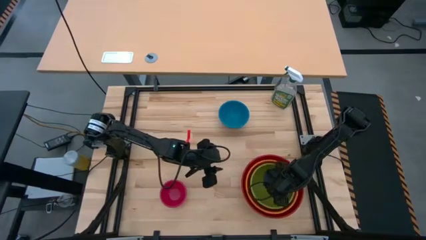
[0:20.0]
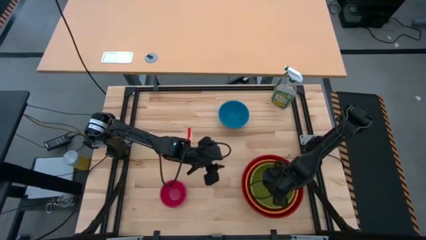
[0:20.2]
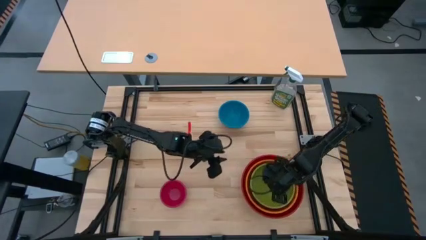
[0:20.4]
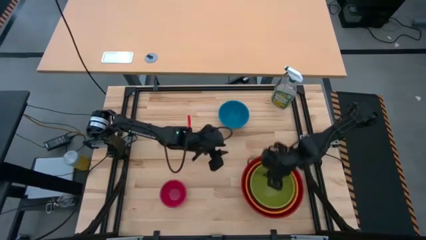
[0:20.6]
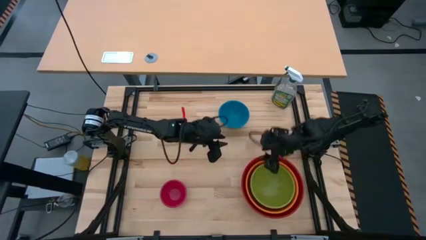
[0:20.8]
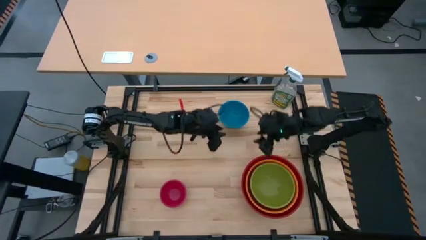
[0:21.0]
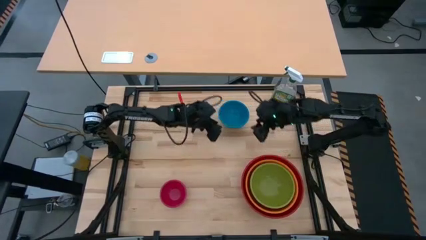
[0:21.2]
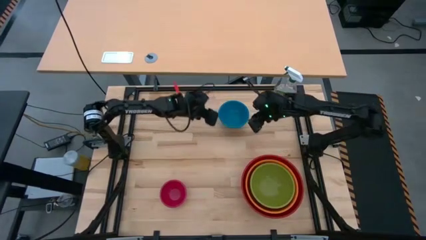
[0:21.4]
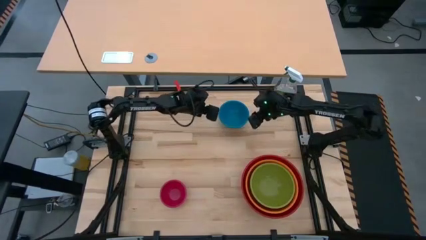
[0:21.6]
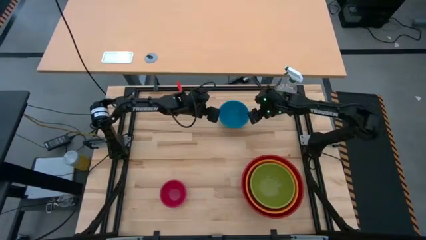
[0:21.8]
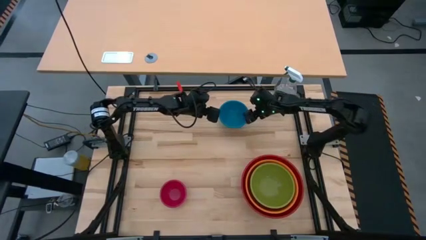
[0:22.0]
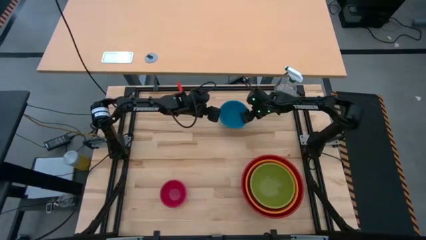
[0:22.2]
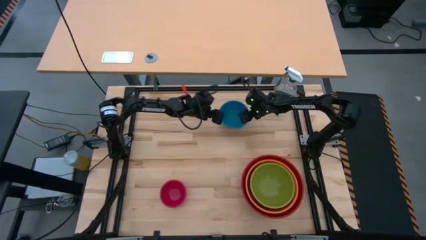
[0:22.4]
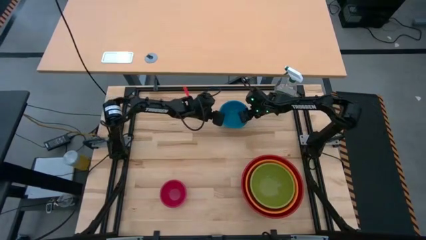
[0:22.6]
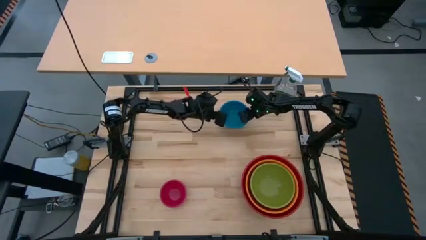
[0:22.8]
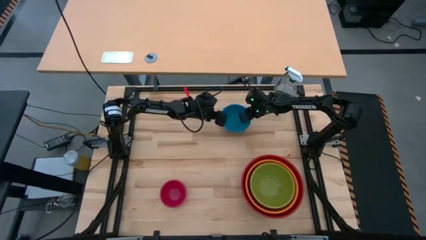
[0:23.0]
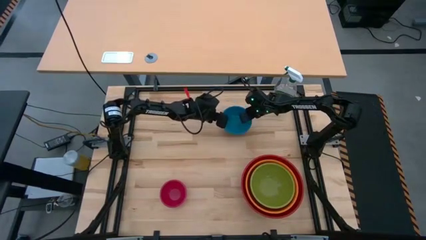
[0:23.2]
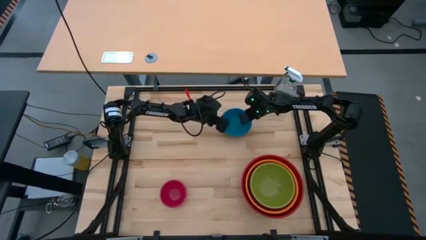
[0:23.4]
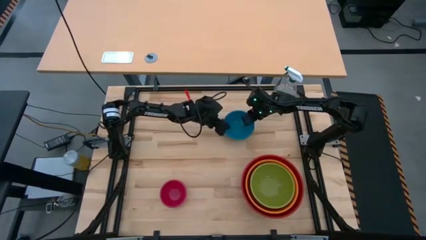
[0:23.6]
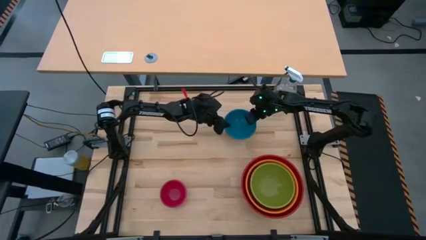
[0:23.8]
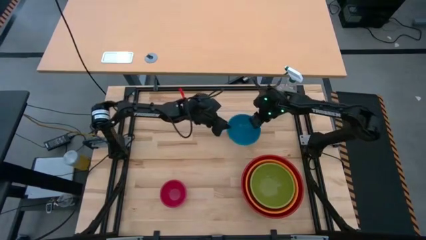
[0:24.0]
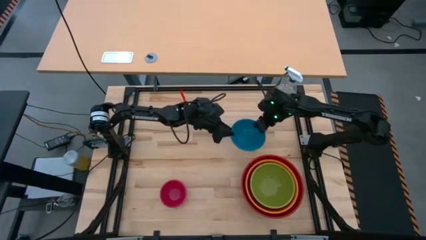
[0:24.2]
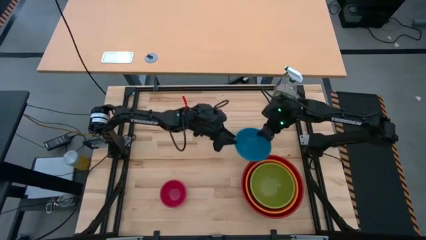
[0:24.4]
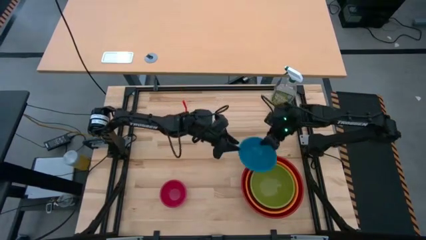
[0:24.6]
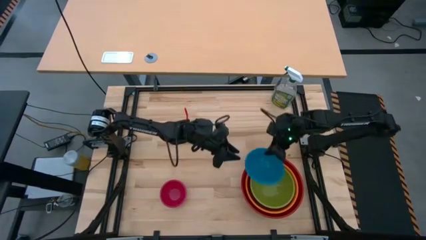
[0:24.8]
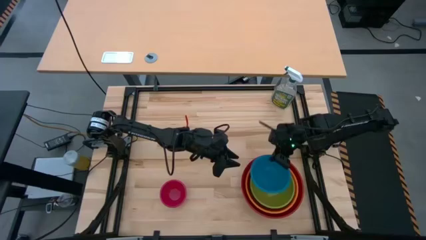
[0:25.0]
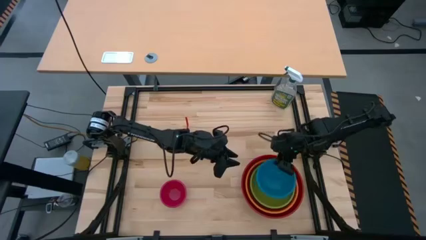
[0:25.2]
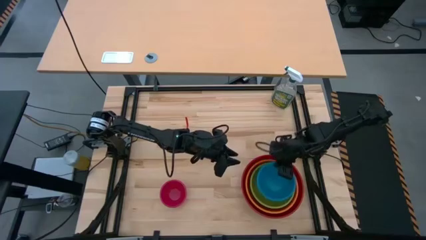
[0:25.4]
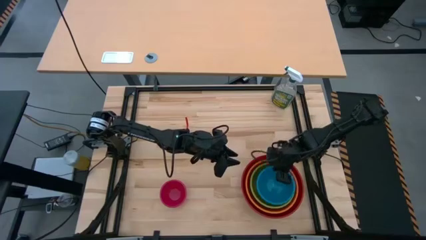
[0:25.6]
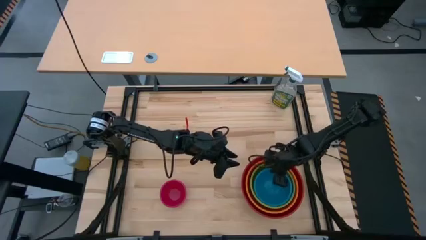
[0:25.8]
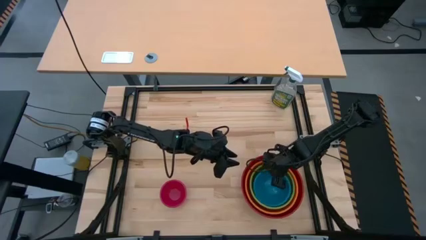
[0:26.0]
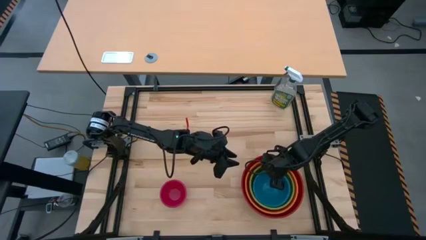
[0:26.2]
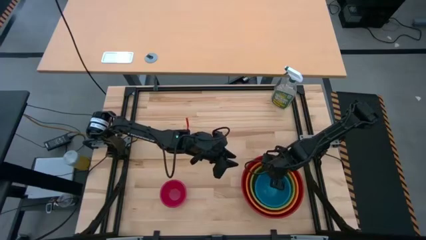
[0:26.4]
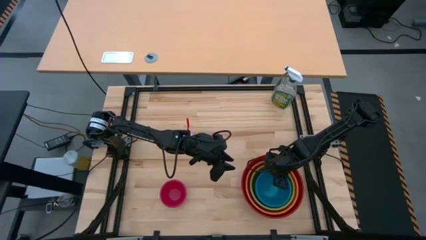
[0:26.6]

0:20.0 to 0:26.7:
Task: Nest bowls inside each other by size order
Stack the blue bowl on top of the green bowl

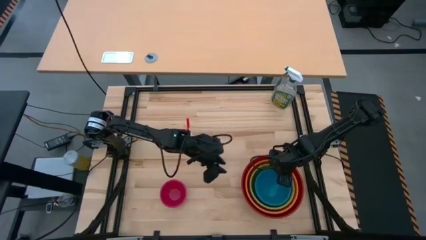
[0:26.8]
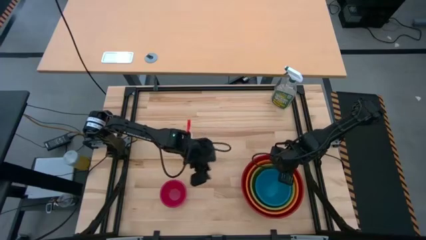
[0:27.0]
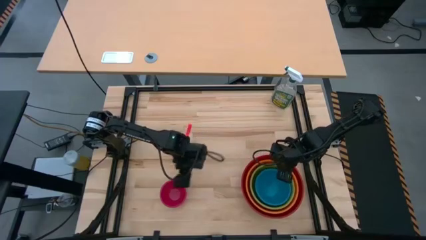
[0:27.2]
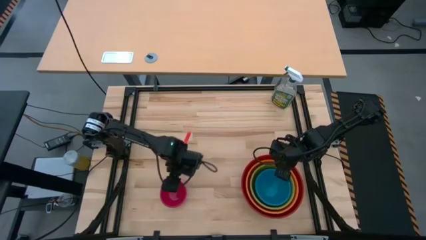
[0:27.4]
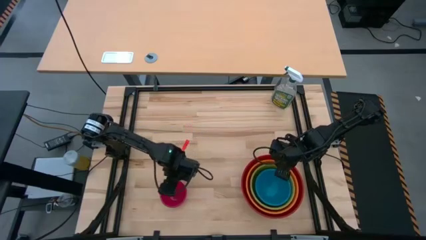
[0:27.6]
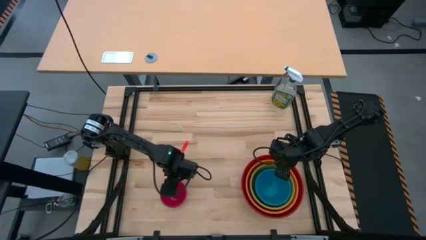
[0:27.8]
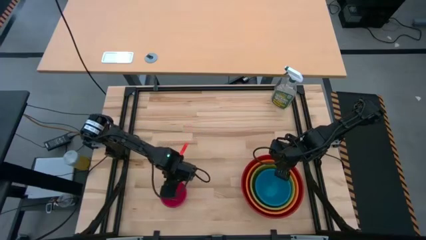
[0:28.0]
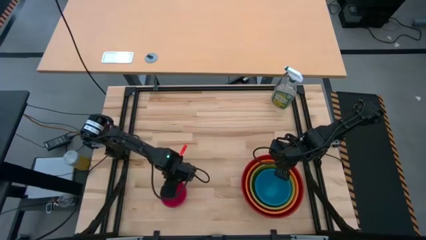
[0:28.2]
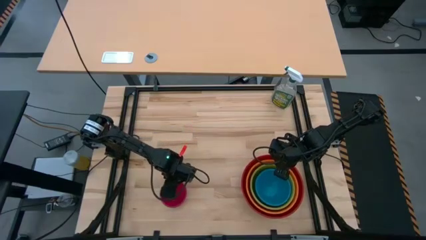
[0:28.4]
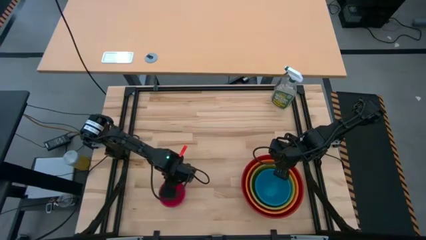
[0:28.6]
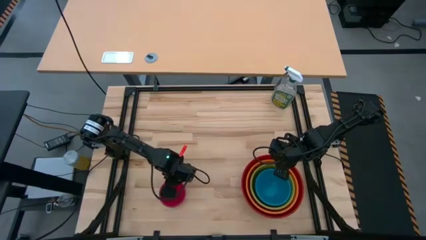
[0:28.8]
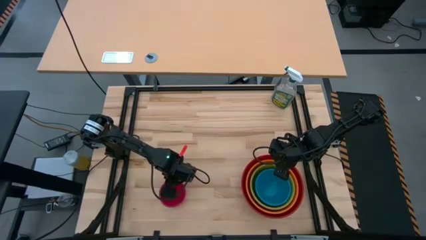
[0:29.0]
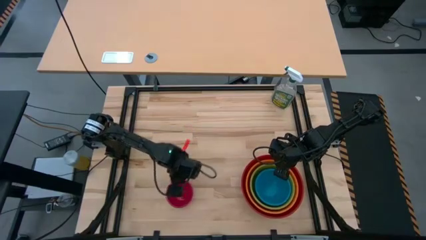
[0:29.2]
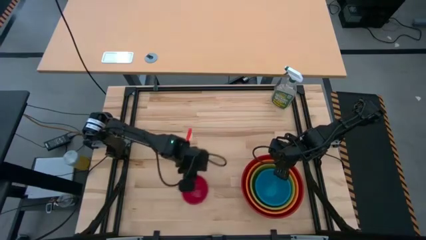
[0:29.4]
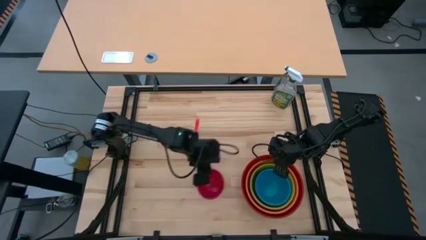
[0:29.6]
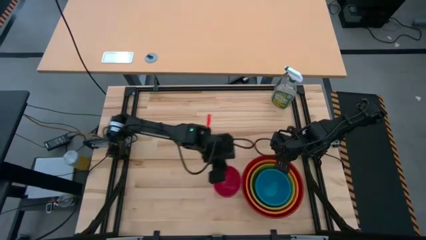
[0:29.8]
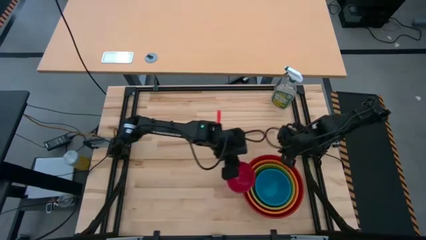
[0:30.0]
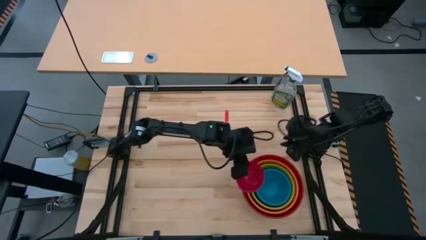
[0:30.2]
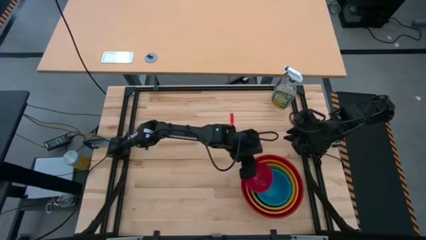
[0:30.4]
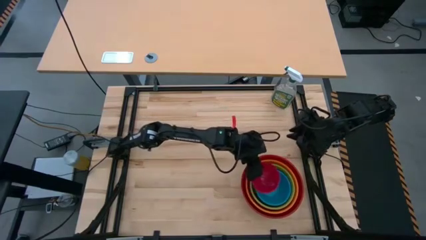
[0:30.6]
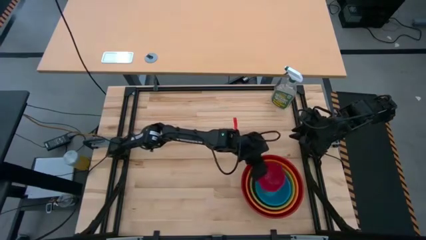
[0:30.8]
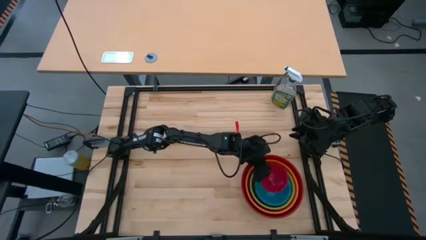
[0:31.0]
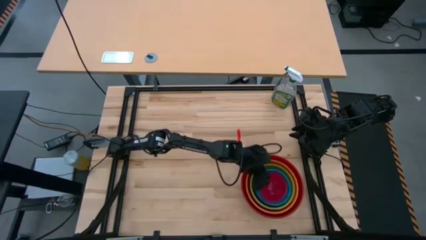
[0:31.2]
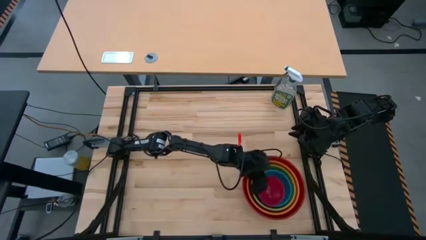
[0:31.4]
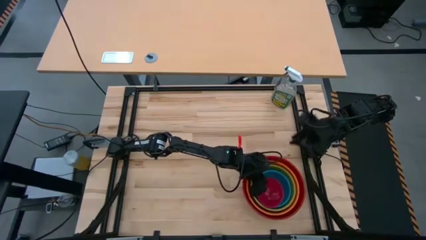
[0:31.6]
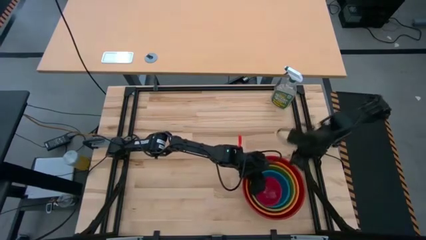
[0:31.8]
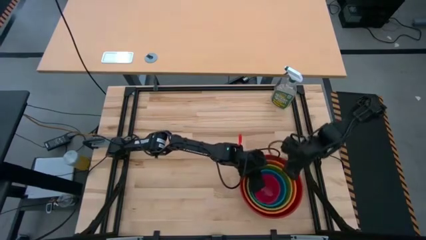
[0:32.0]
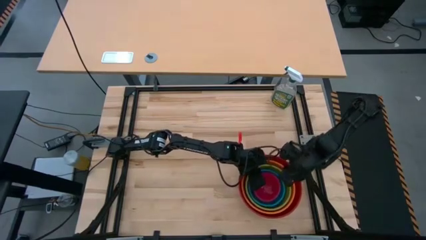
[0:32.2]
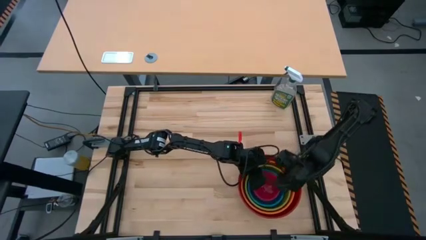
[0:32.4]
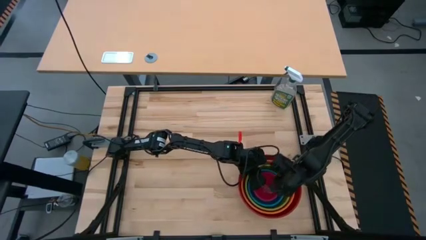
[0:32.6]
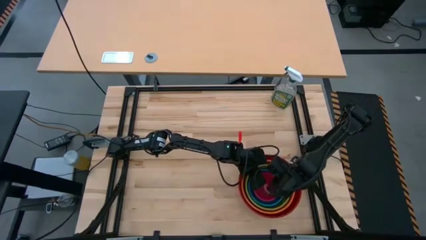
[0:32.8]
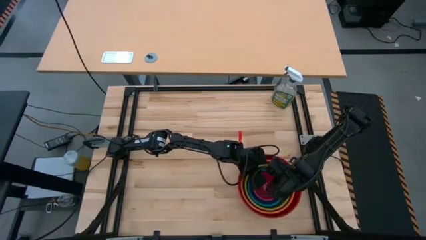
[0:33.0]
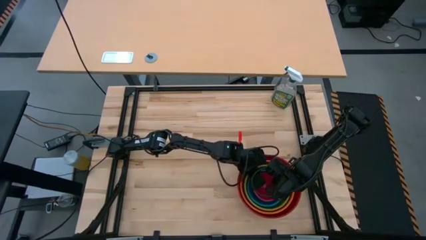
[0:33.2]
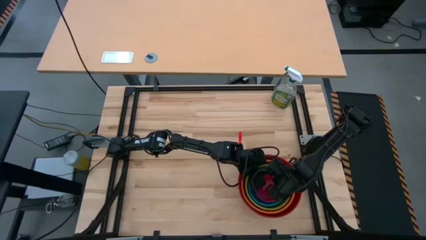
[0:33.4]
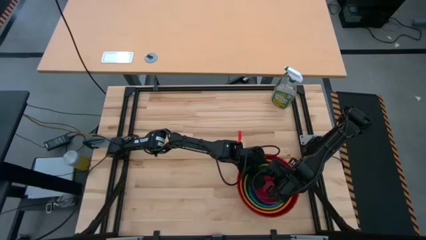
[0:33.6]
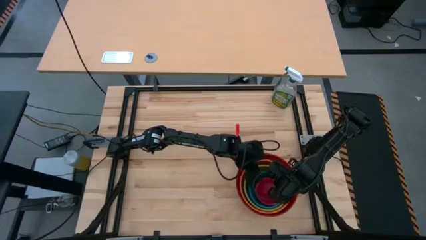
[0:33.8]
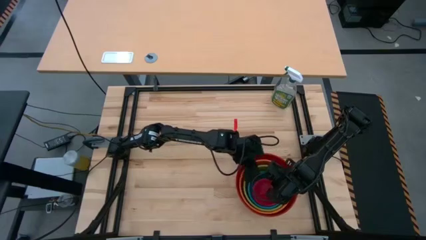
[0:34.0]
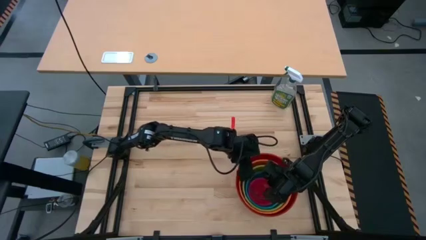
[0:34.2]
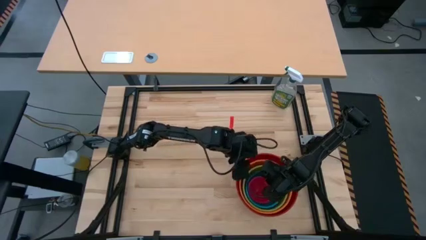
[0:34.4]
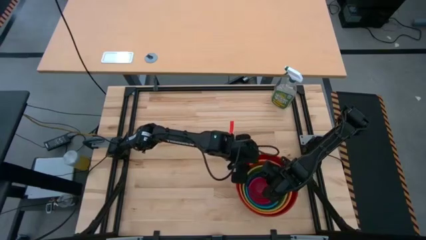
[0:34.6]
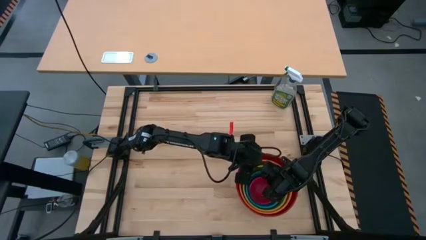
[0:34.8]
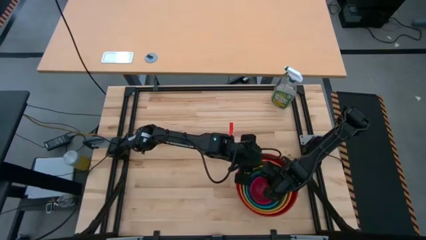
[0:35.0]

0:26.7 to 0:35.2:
Put the red bowl on top of the blue bowl
